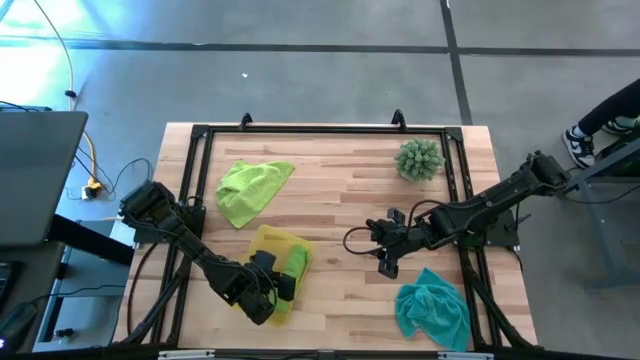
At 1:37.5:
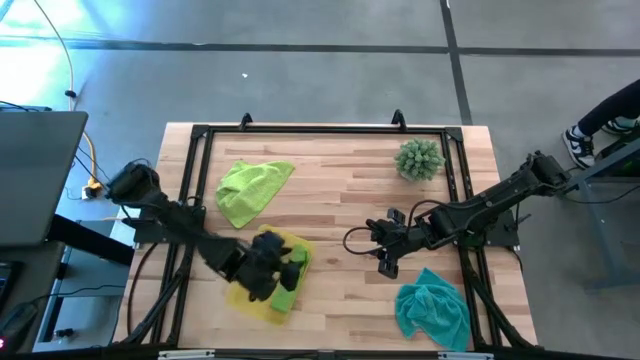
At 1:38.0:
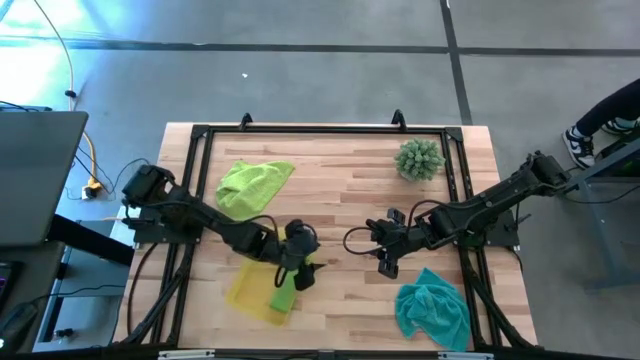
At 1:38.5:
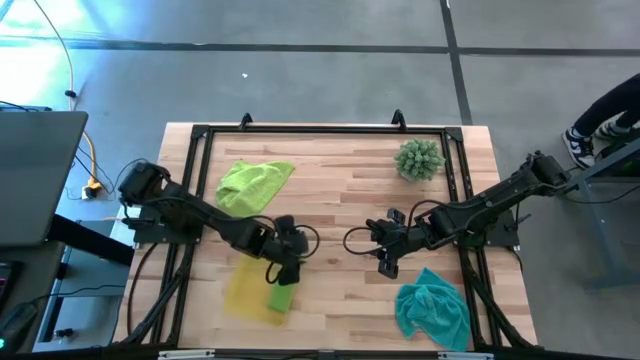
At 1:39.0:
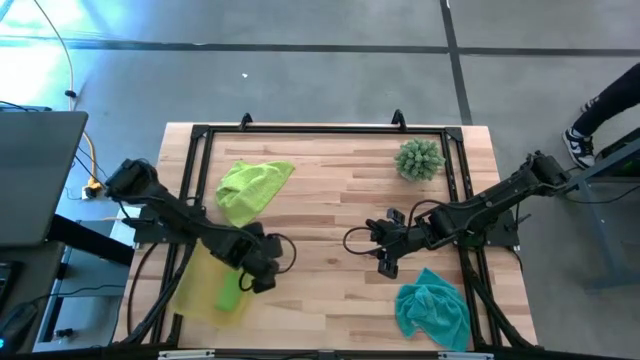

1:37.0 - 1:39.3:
Task: Roll microfiber towels into tight, uniform cylinder then place into a basket
Adjust the yellow bin

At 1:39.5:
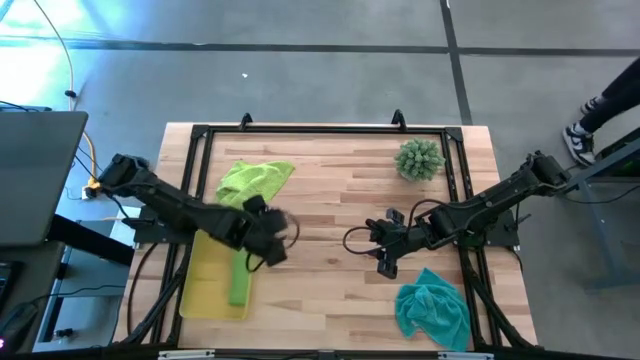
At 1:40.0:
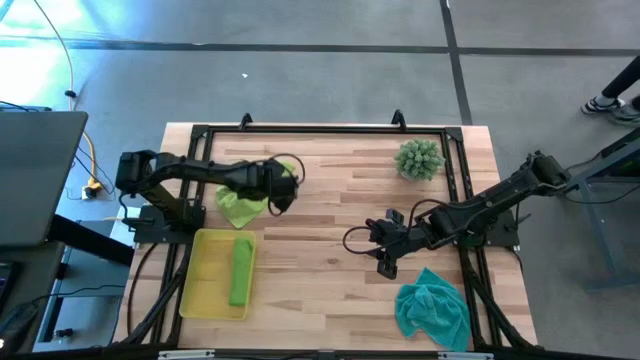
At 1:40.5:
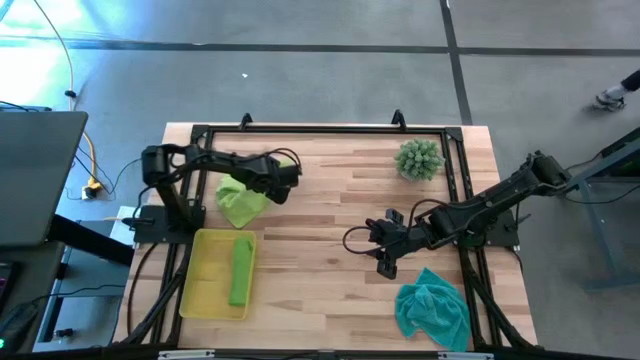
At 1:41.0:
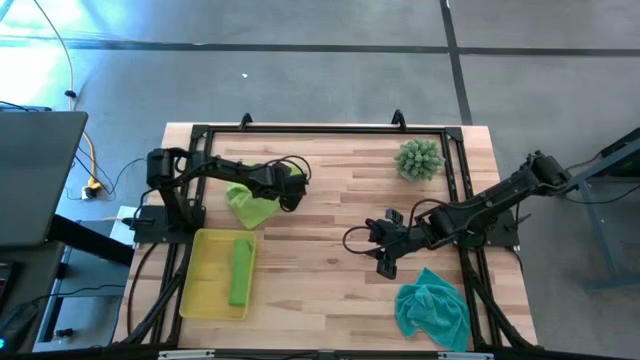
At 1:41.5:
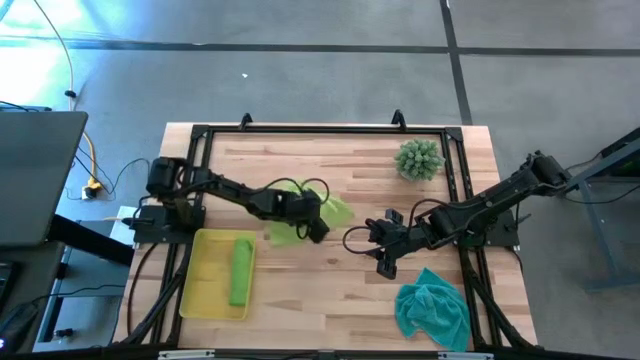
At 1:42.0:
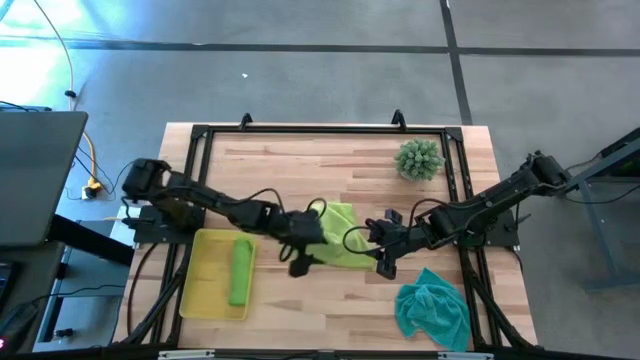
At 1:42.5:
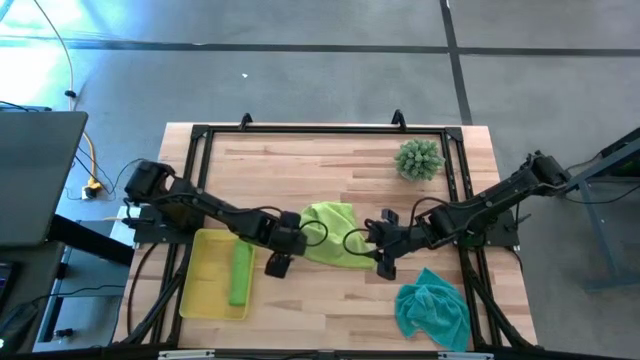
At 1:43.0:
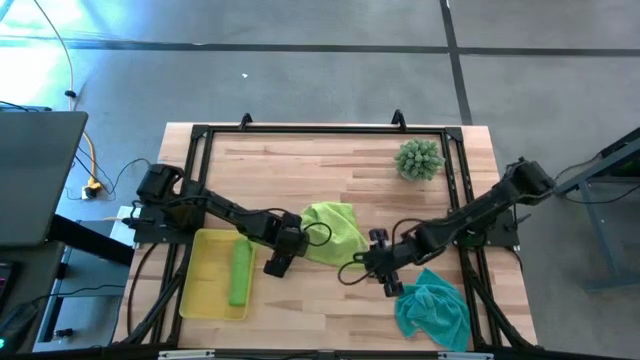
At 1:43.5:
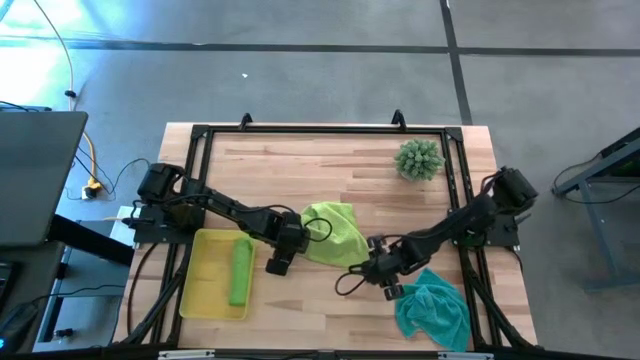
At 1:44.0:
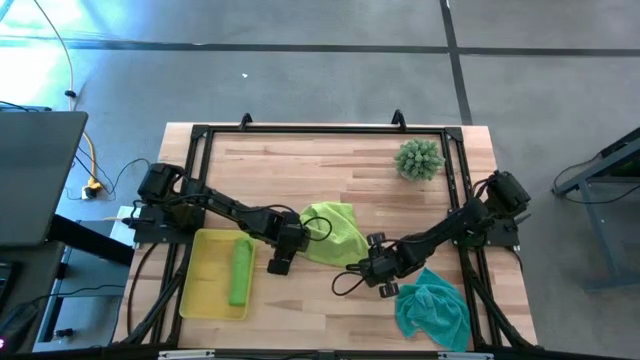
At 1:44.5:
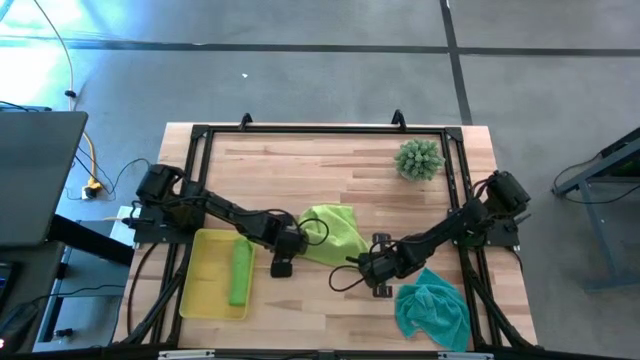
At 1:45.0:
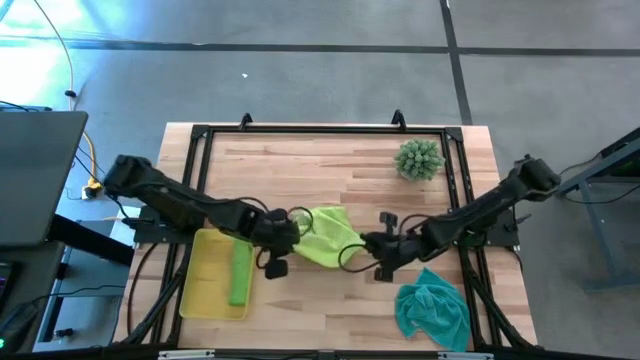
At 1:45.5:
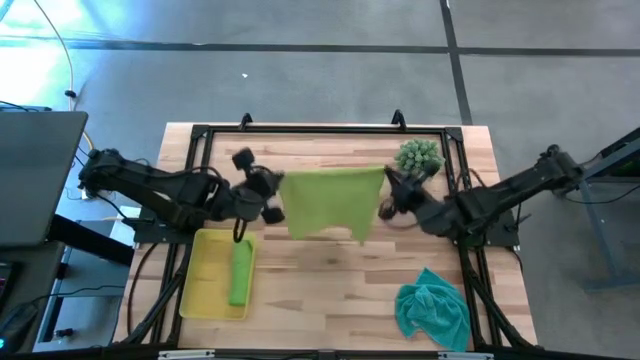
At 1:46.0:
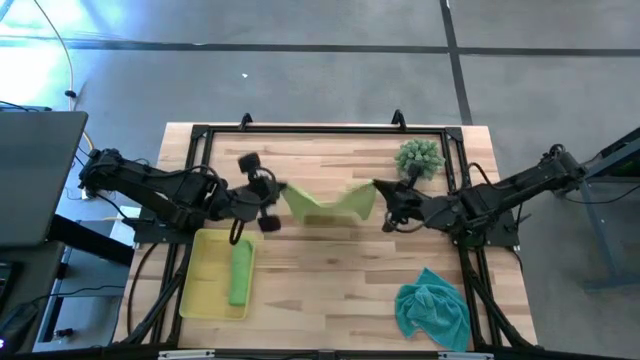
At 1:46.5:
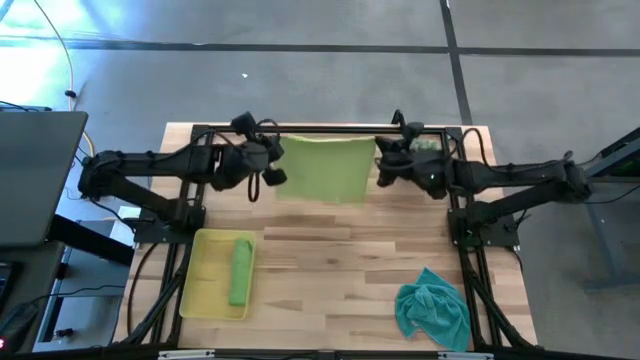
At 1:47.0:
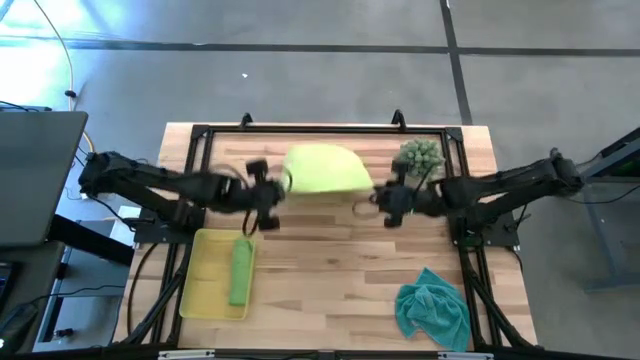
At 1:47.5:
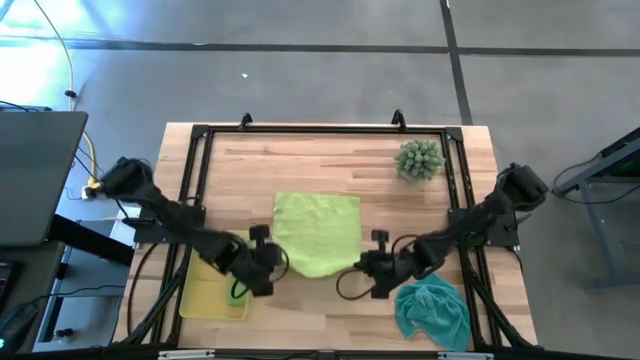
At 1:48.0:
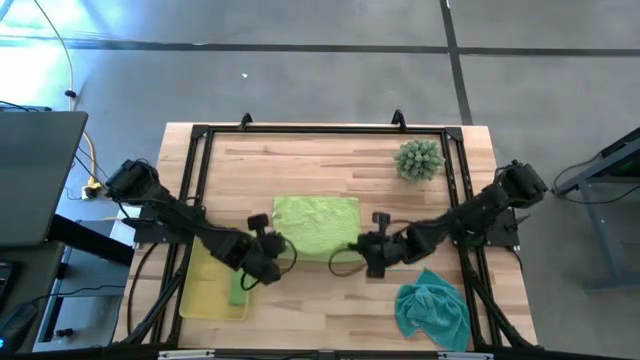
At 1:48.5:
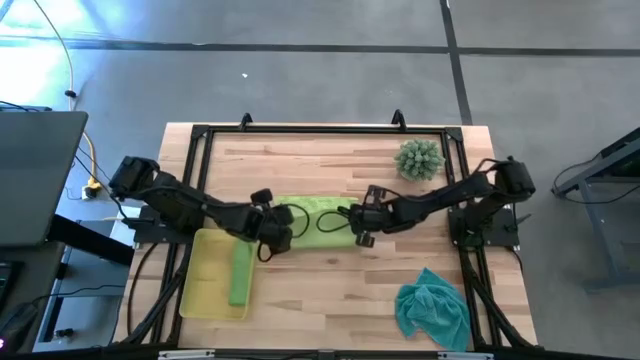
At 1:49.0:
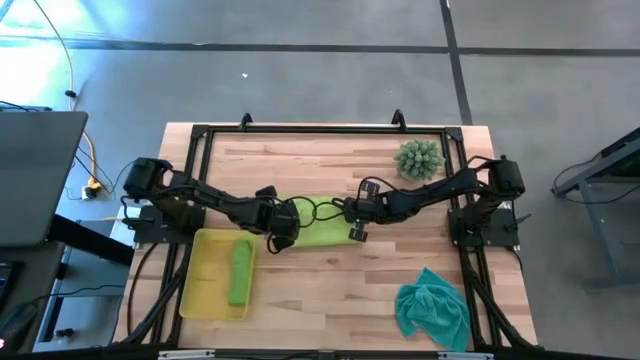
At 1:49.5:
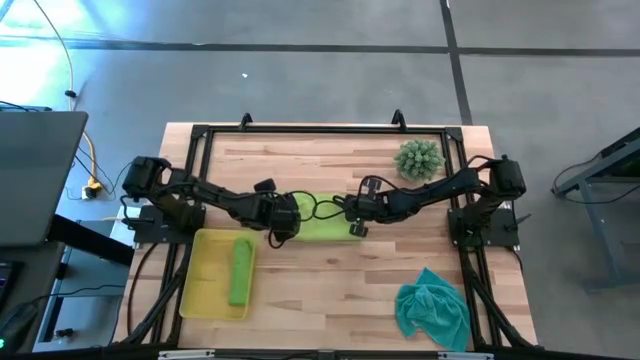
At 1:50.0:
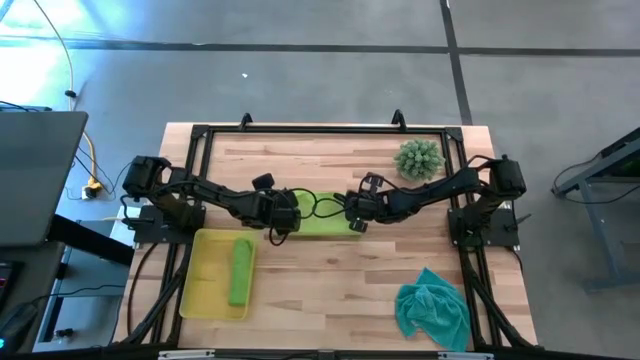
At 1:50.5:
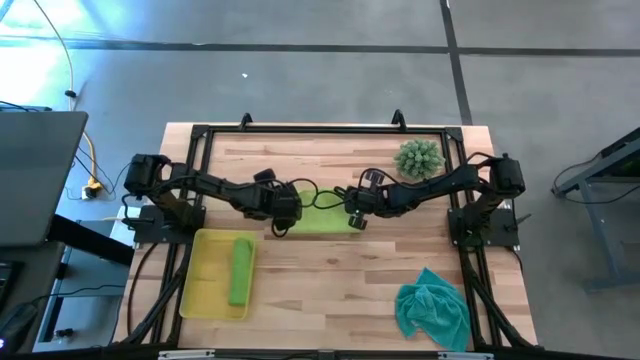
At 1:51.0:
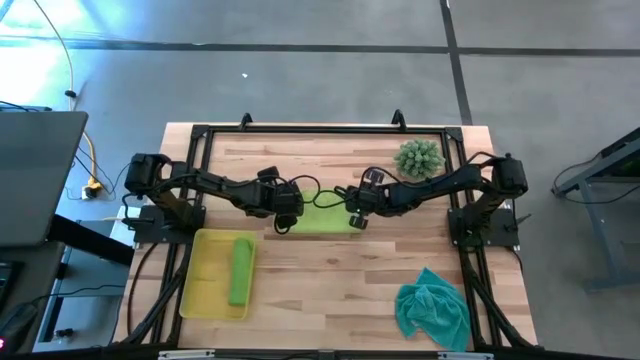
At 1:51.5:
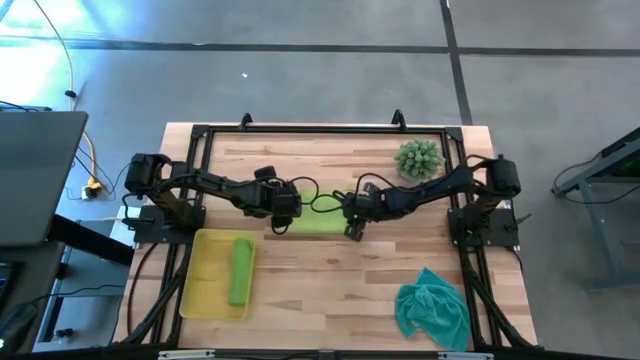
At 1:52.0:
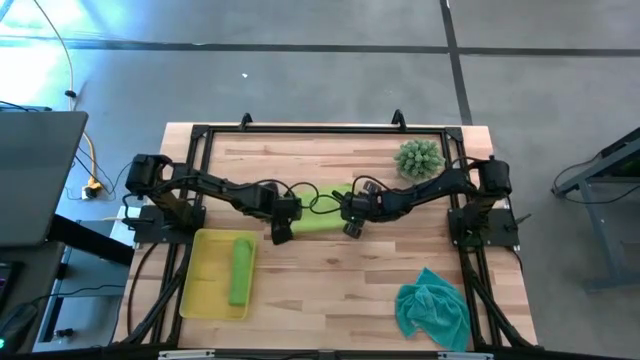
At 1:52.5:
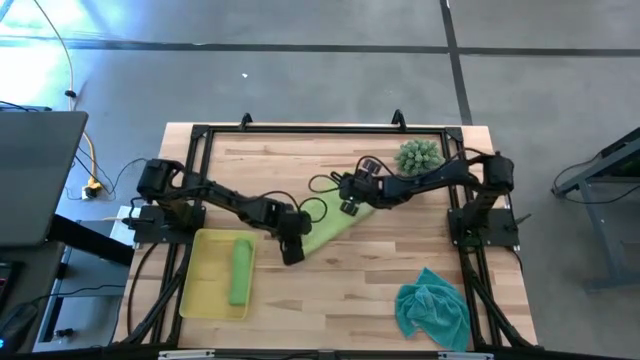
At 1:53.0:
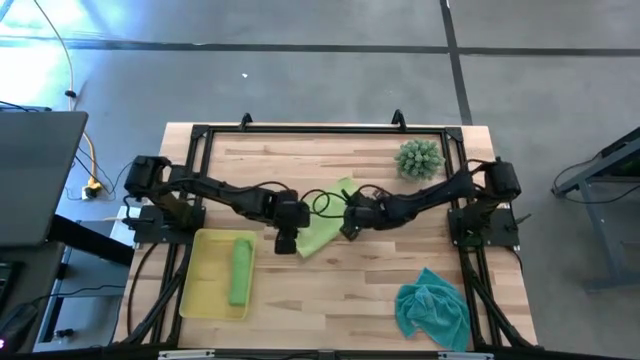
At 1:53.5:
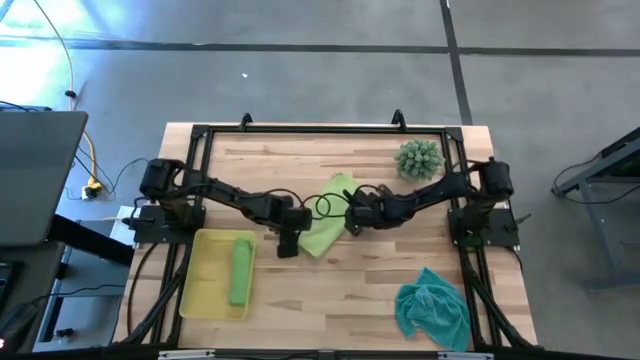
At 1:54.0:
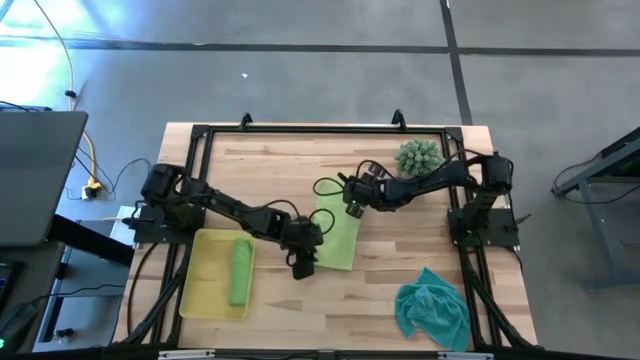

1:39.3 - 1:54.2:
Fold the light green microfiber towel

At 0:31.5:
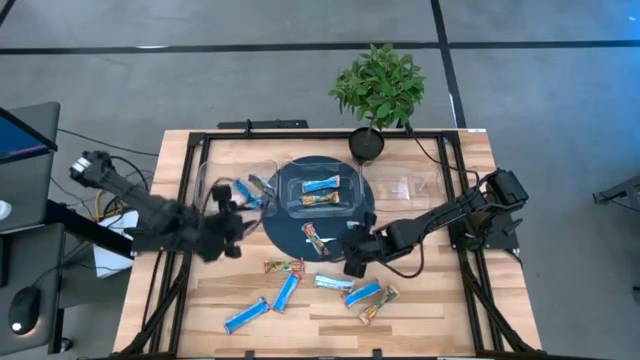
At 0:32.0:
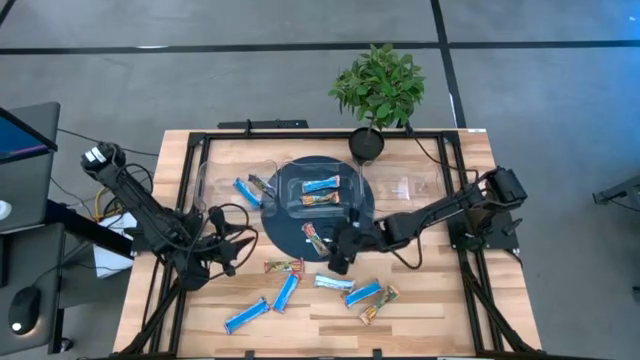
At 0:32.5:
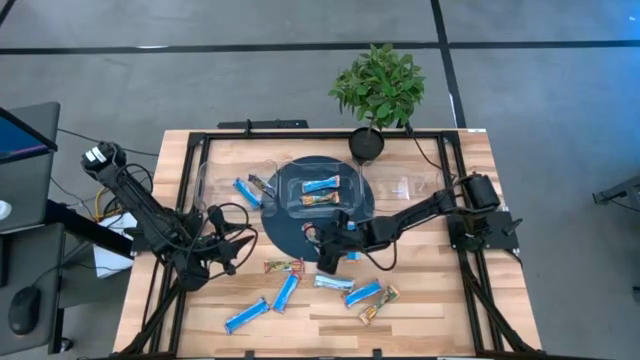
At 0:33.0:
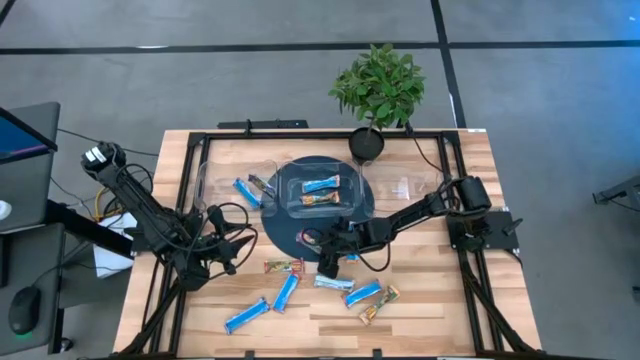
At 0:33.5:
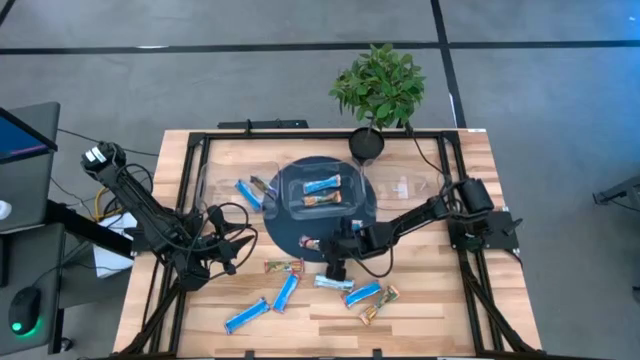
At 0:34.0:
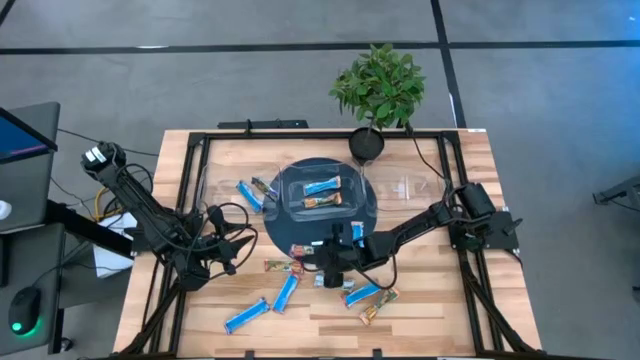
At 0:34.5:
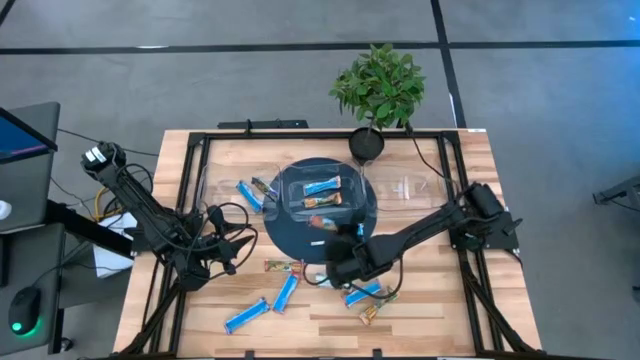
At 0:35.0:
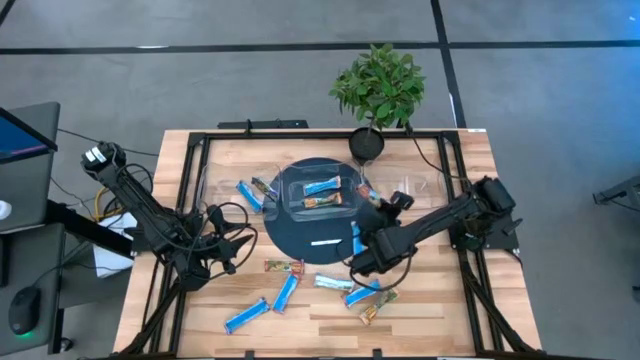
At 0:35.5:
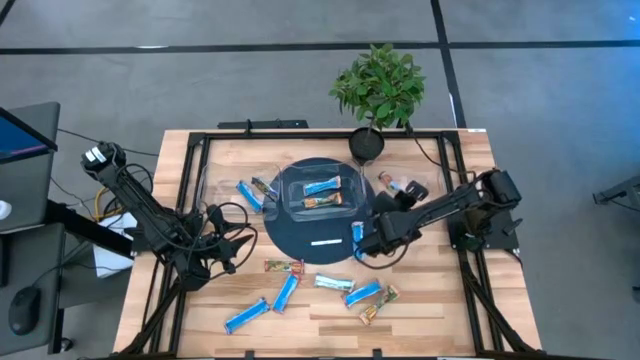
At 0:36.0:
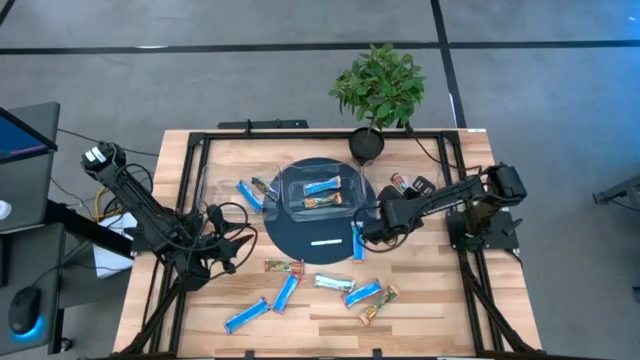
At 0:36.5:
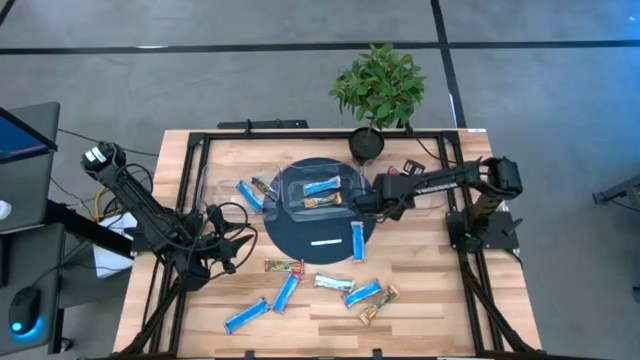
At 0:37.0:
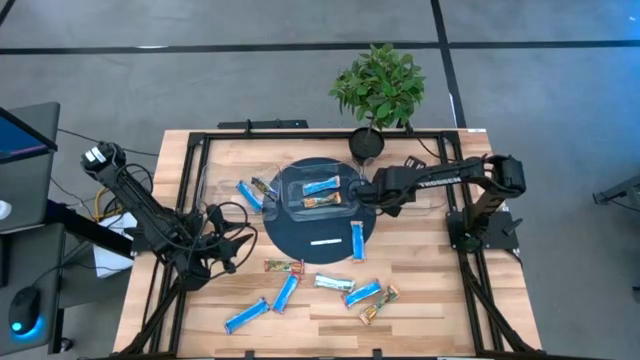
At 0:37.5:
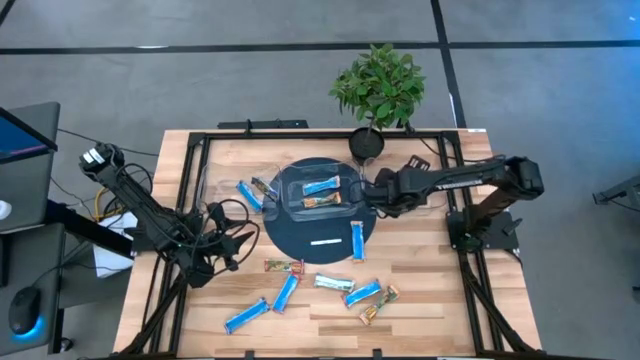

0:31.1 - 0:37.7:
Task: Pick and place Granola Bars by type
Put the top left red snack bar into the right transparent bin
